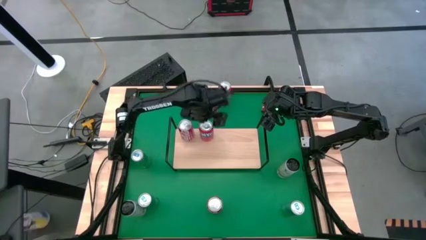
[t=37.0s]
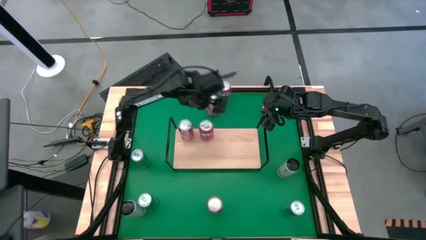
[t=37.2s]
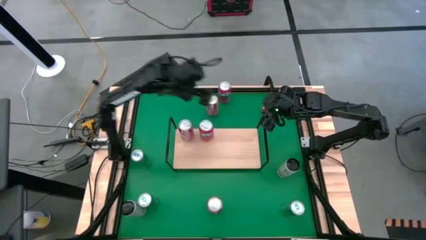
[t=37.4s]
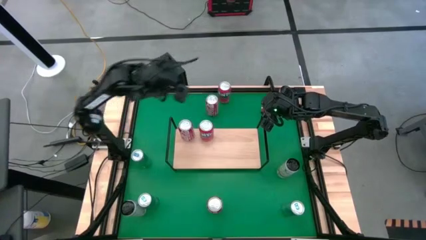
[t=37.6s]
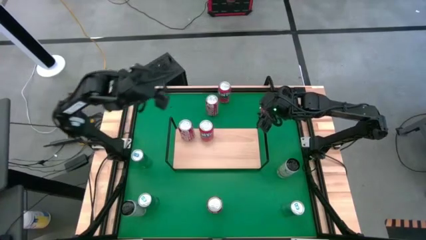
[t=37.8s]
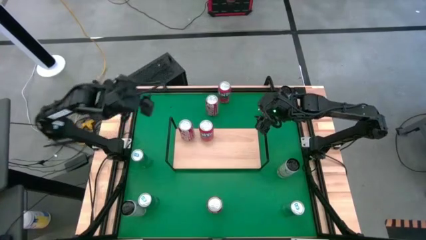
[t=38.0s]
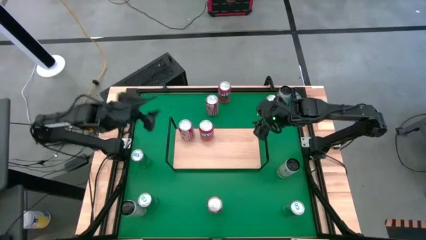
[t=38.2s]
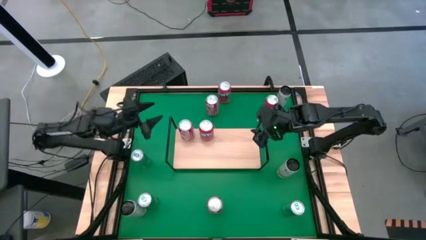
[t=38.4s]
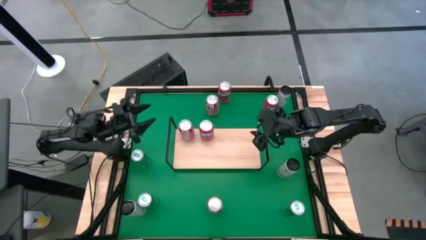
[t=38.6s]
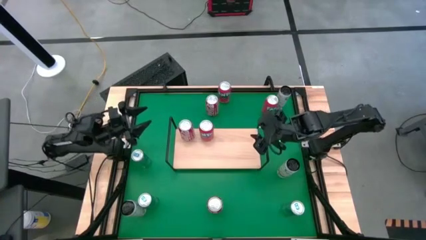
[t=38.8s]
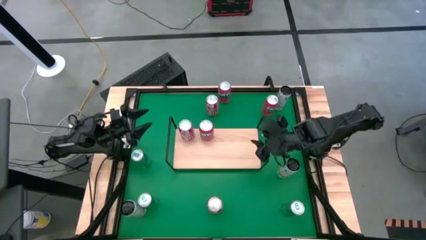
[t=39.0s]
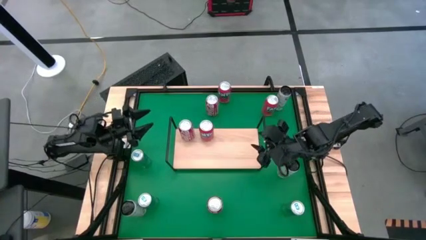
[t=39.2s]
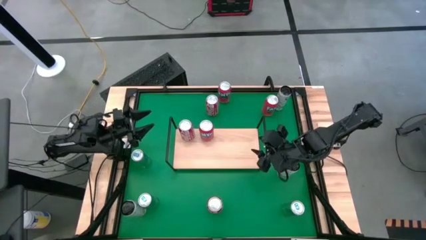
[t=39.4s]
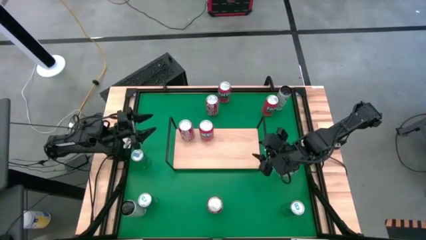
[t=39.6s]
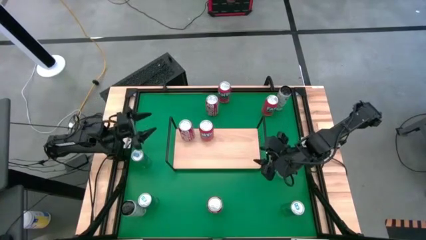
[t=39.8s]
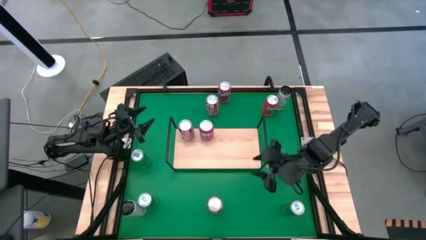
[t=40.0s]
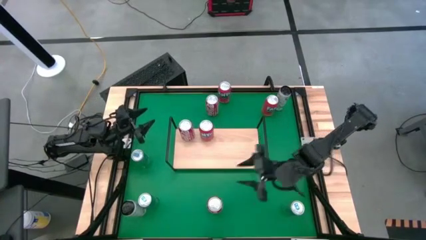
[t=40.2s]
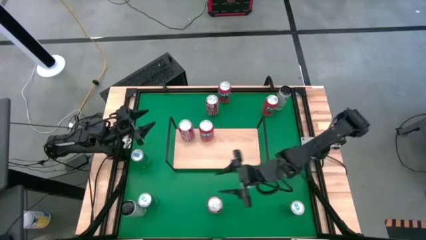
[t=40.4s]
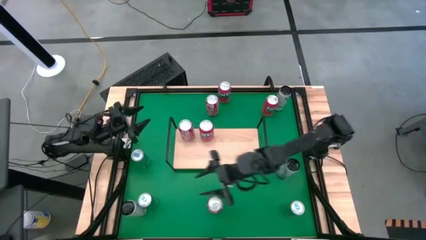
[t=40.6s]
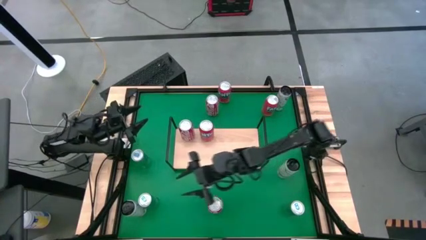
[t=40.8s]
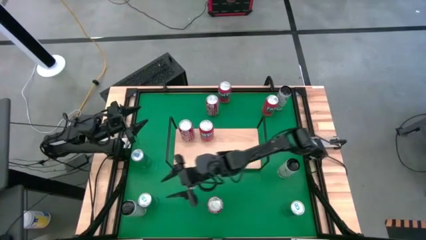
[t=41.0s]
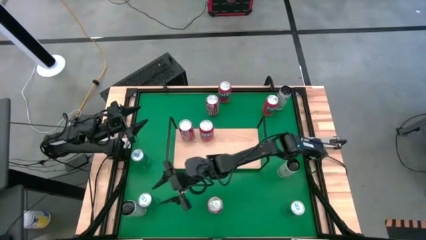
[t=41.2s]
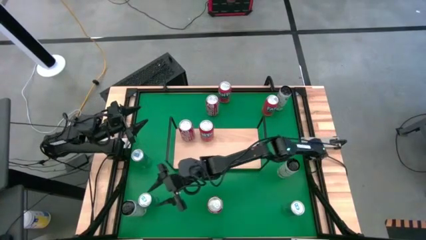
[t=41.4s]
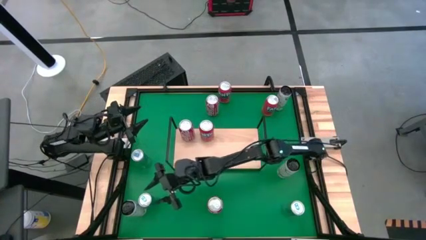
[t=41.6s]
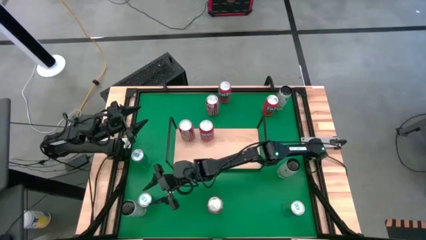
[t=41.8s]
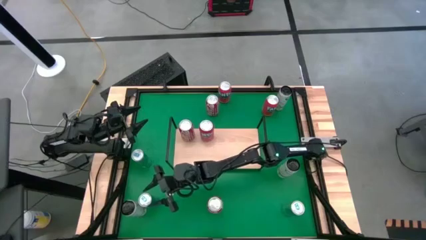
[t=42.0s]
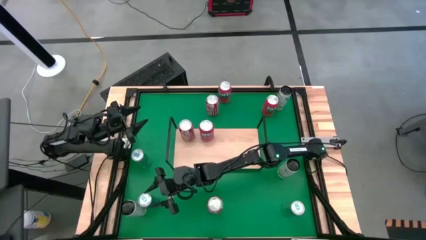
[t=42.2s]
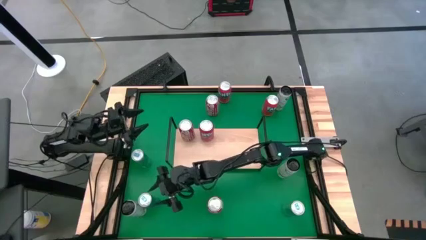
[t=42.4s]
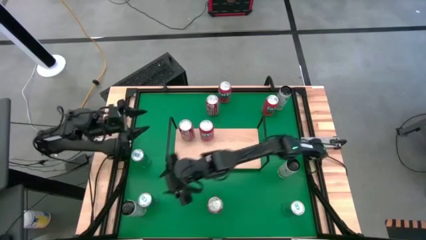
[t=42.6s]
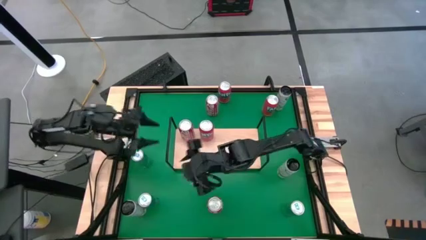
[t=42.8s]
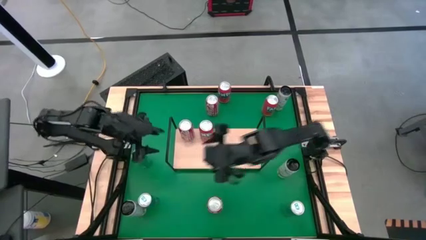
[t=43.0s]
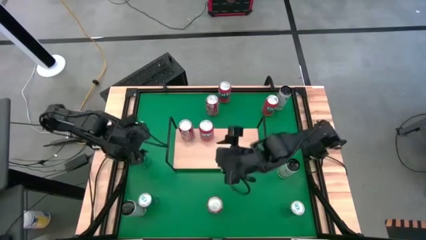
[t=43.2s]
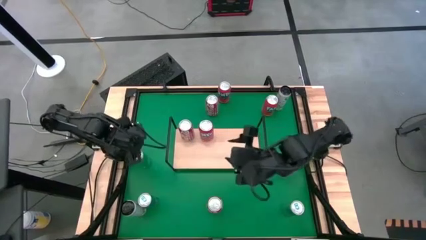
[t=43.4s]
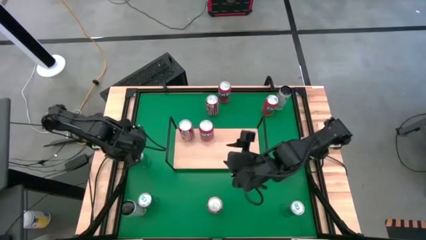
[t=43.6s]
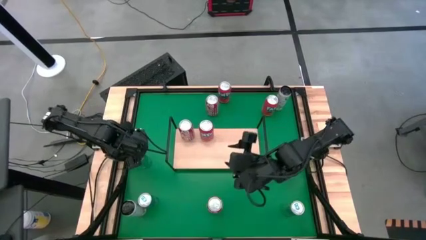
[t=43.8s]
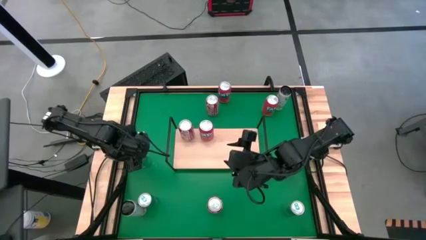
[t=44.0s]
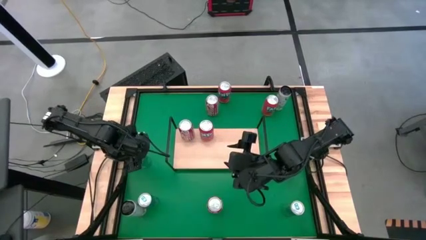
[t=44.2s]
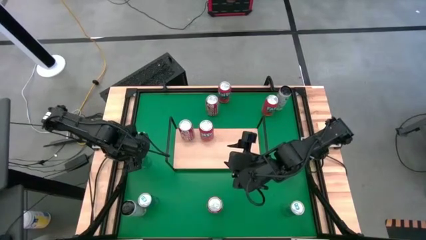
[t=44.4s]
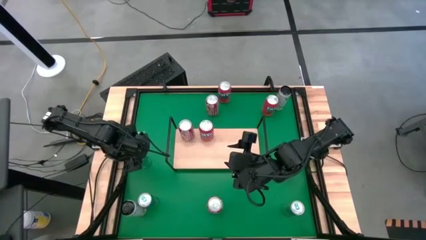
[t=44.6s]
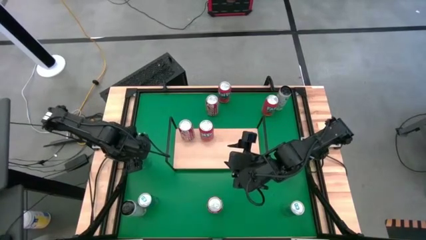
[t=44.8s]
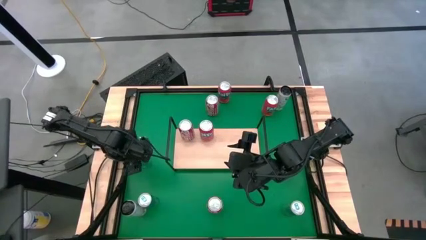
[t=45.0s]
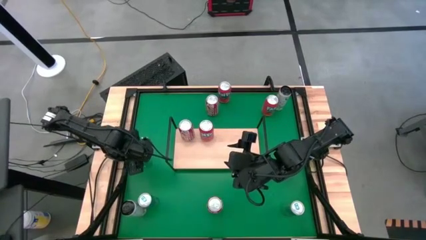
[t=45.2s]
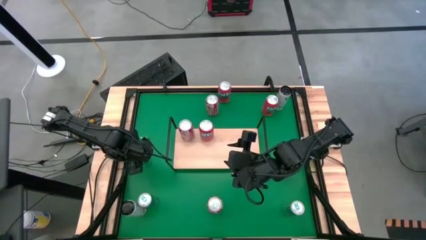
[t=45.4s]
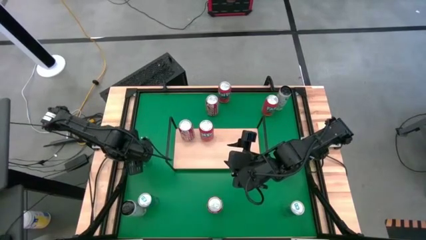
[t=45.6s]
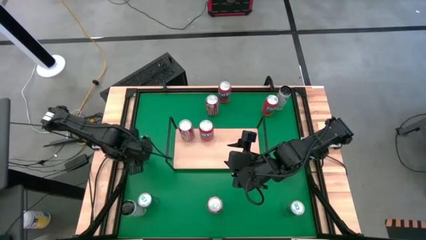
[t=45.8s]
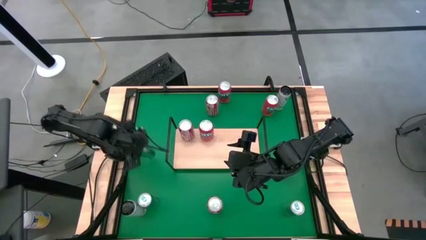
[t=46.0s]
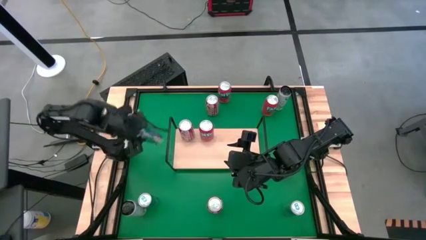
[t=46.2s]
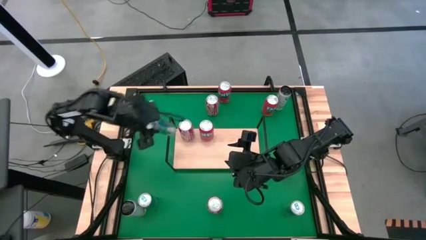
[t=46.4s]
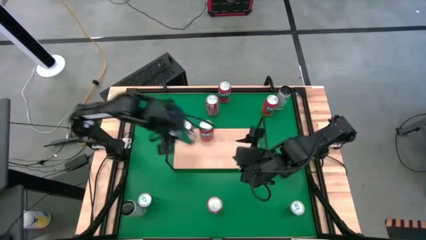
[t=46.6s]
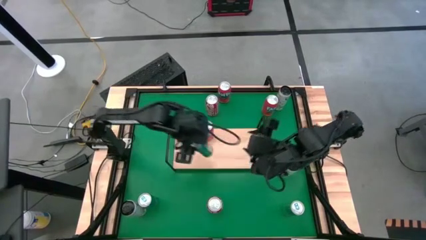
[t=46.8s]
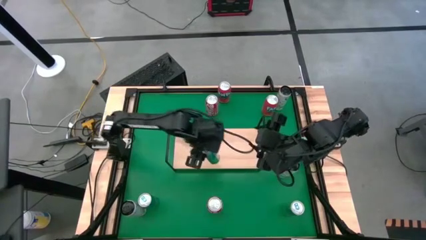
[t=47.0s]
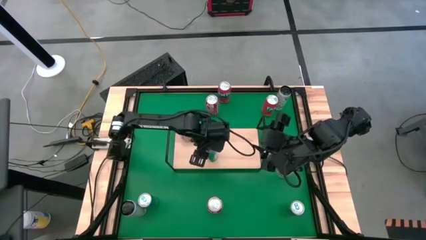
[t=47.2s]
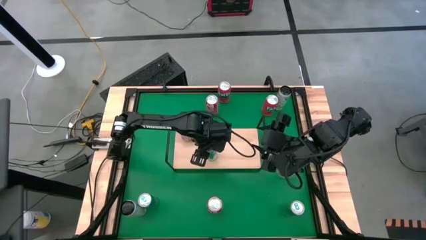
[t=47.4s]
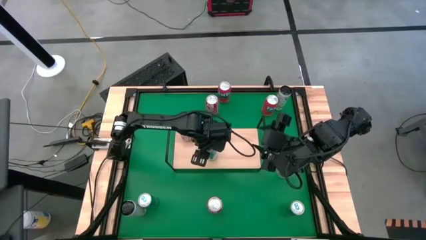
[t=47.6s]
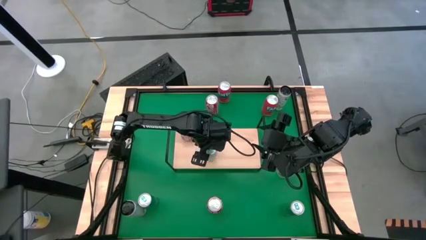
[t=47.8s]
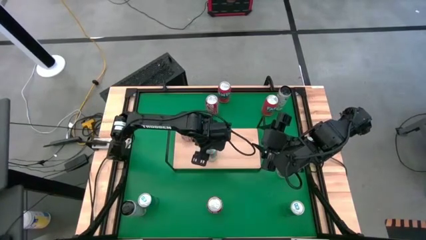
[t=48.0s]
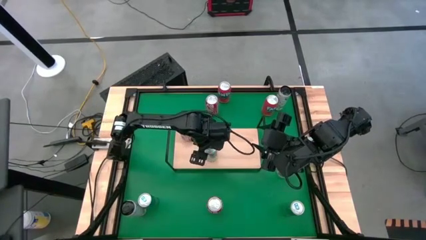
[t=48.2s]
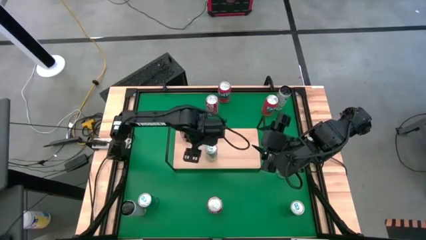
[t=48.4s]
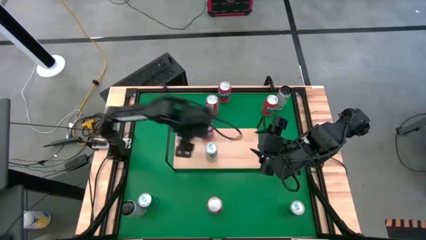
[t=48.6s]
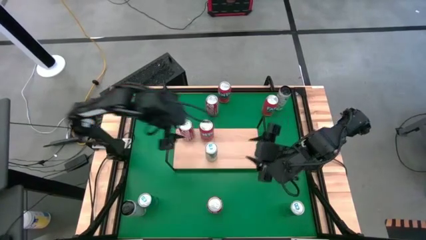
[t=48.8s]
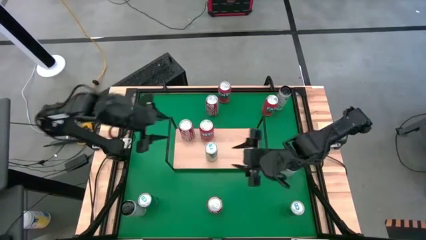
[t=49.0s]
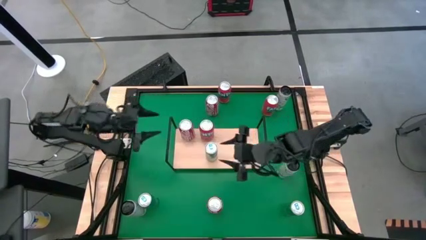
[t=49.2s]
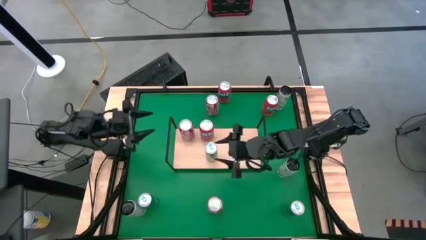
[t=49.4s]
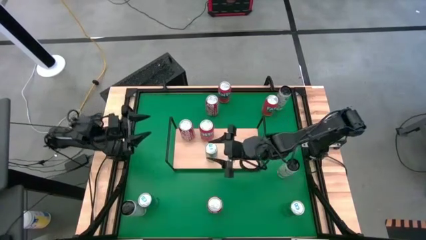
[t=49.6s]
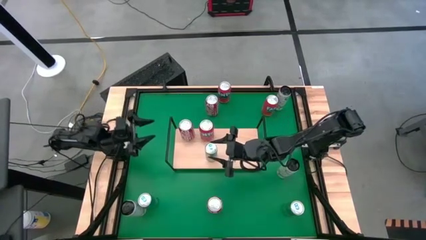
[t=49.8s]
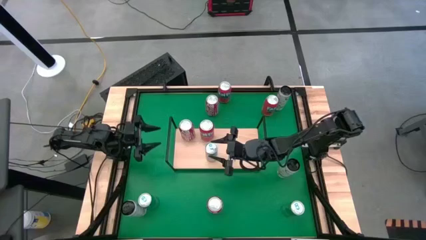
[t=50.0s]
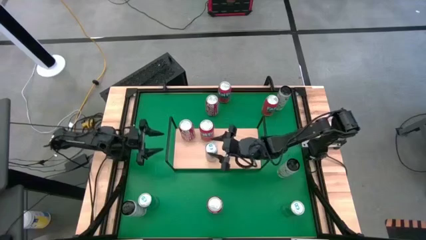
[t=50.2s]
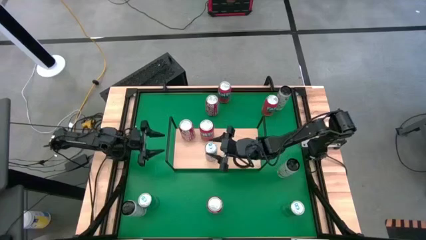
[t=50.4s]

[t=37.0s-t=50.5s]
Task: Place canned beverage on shelf
Put the top left blue soda can on the shelf
